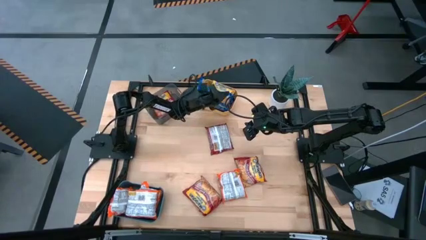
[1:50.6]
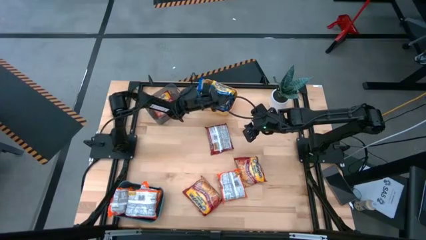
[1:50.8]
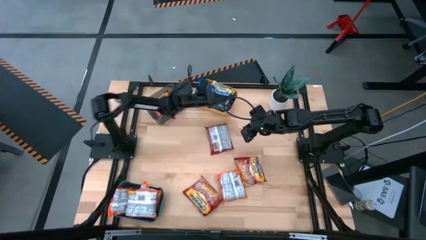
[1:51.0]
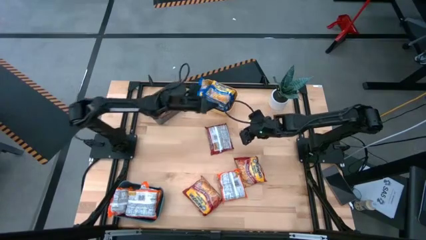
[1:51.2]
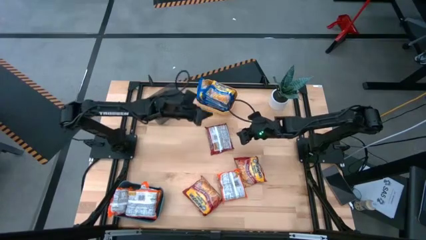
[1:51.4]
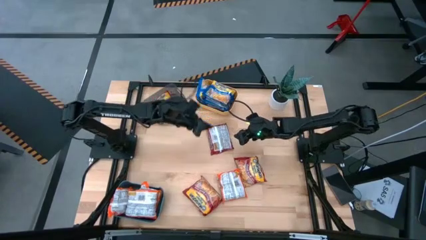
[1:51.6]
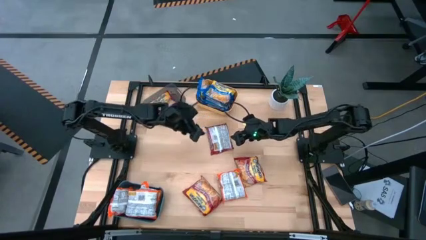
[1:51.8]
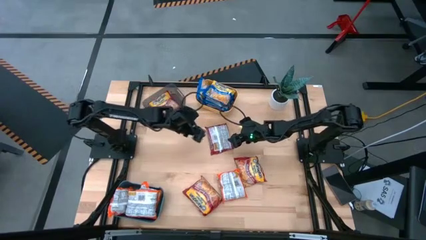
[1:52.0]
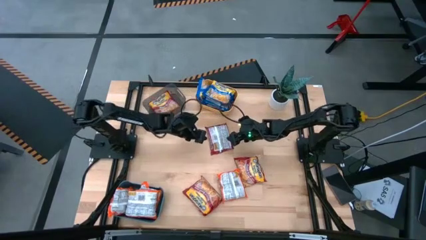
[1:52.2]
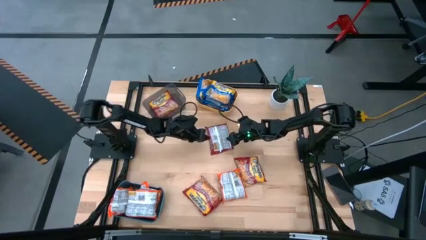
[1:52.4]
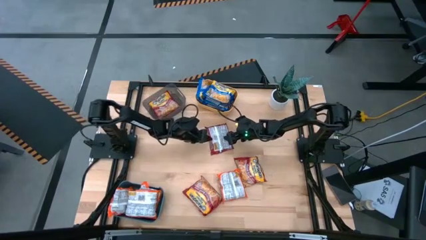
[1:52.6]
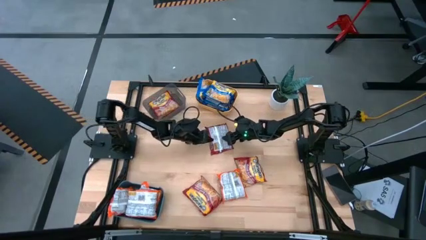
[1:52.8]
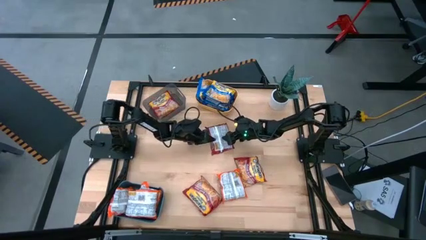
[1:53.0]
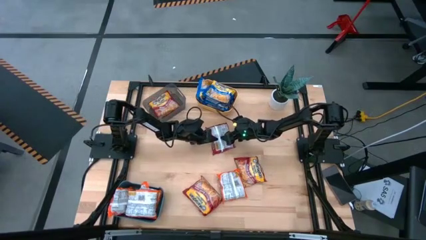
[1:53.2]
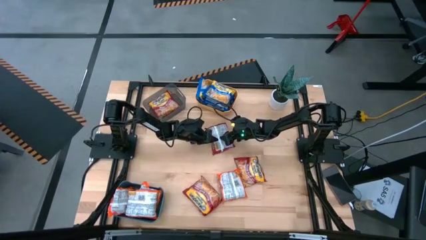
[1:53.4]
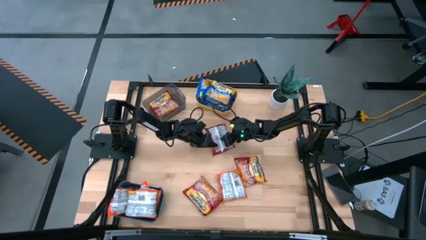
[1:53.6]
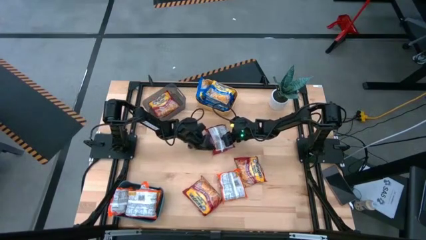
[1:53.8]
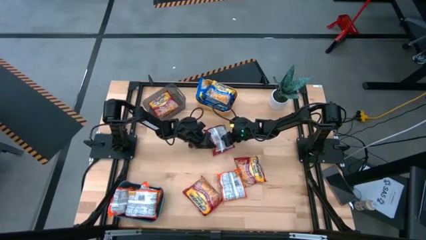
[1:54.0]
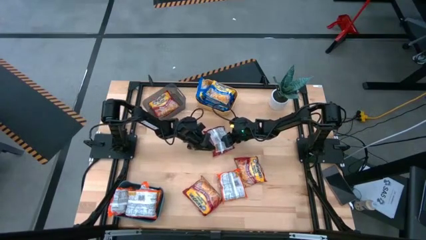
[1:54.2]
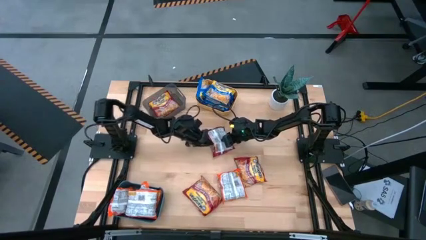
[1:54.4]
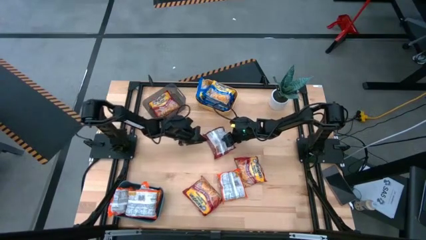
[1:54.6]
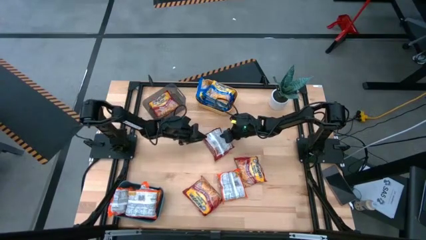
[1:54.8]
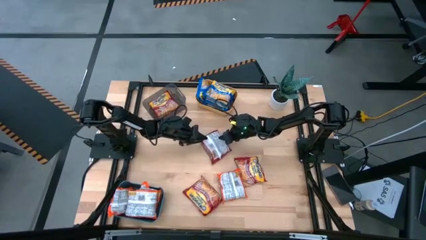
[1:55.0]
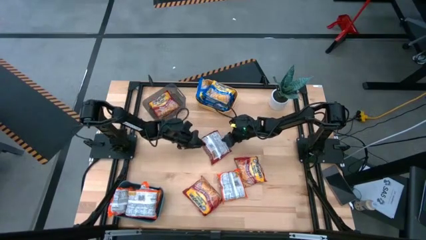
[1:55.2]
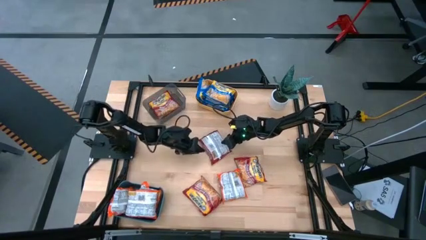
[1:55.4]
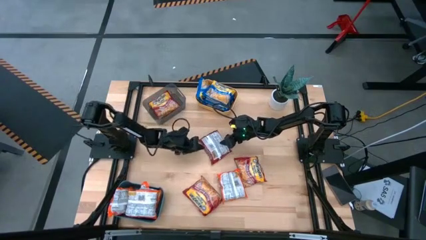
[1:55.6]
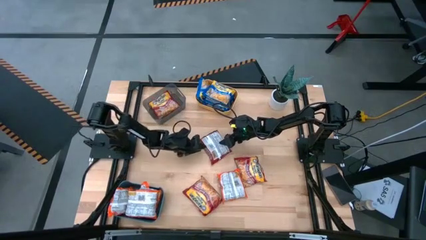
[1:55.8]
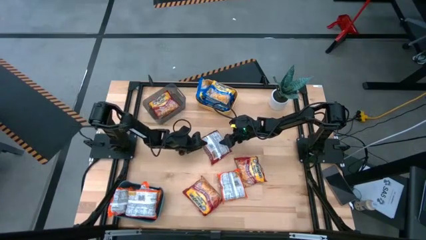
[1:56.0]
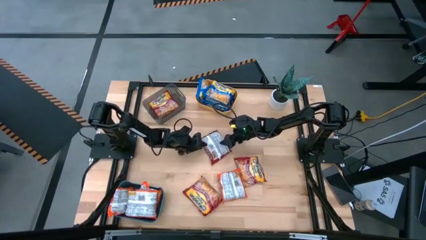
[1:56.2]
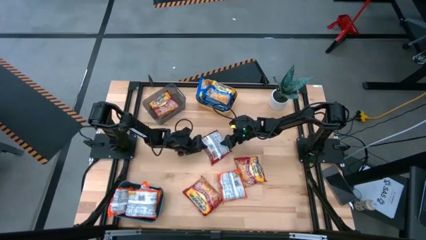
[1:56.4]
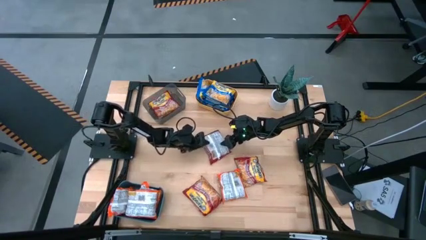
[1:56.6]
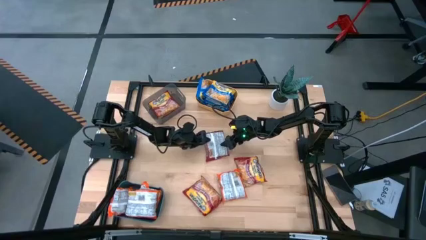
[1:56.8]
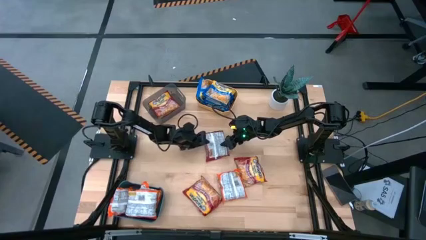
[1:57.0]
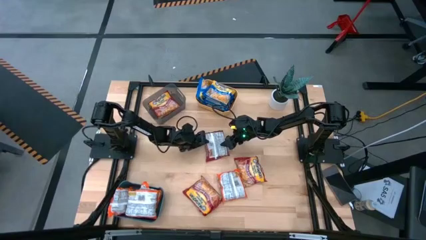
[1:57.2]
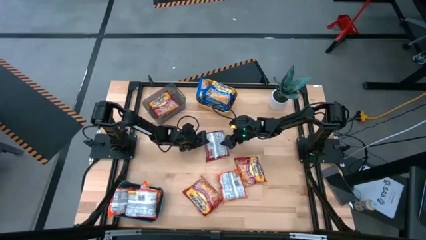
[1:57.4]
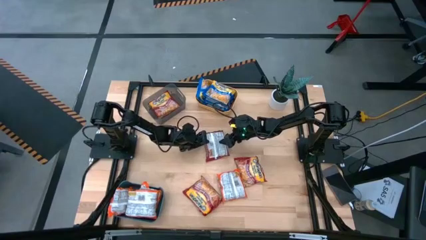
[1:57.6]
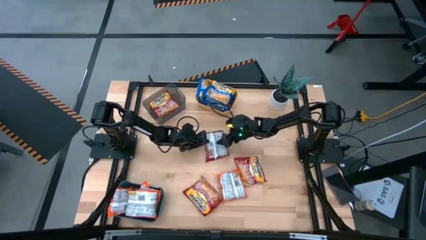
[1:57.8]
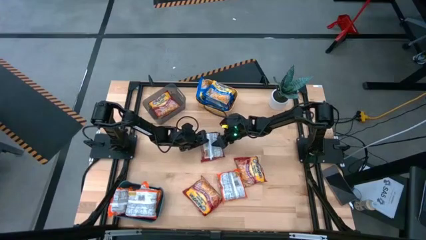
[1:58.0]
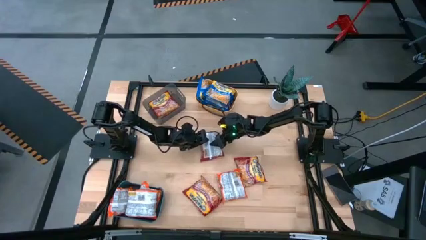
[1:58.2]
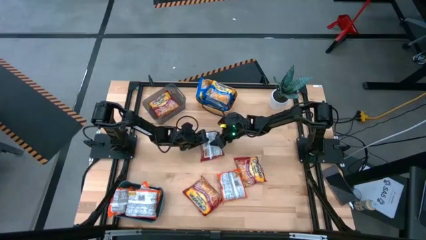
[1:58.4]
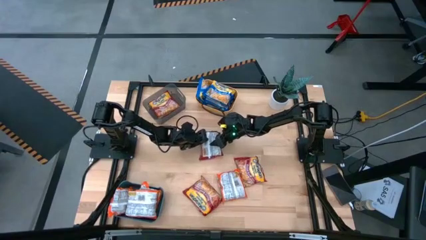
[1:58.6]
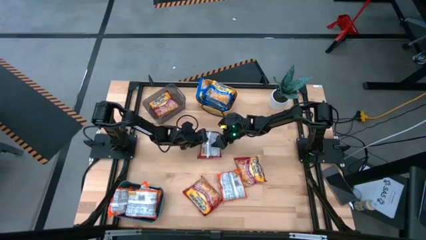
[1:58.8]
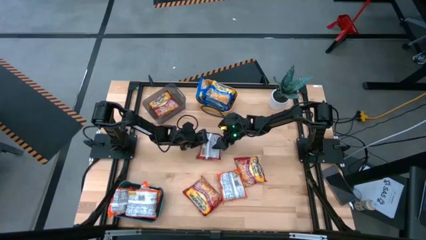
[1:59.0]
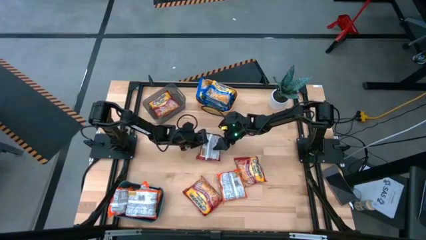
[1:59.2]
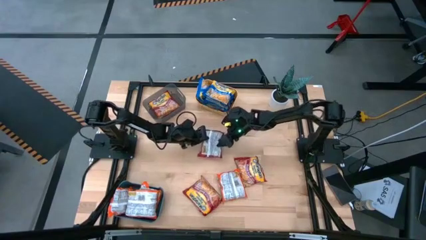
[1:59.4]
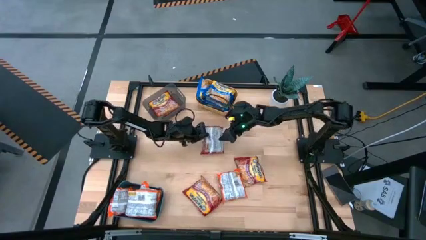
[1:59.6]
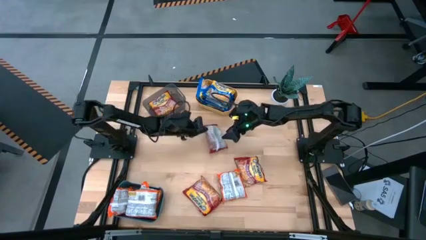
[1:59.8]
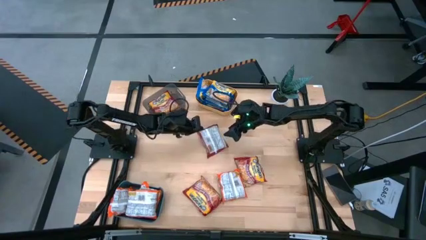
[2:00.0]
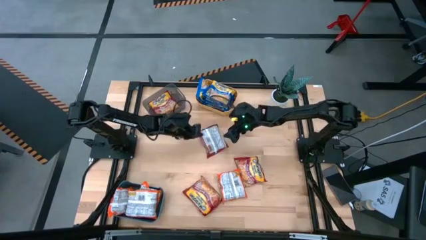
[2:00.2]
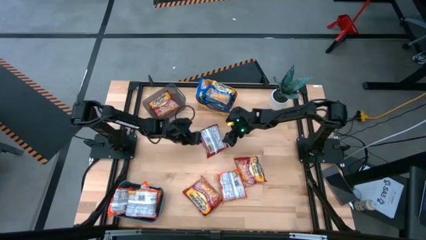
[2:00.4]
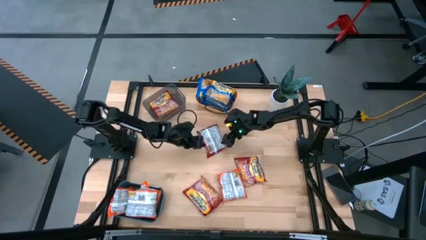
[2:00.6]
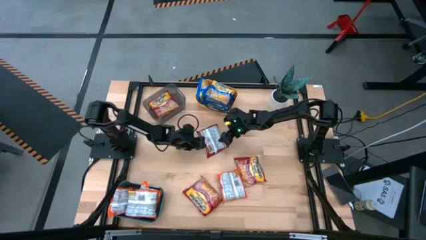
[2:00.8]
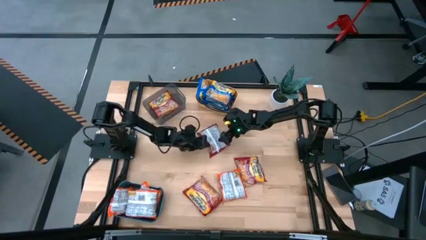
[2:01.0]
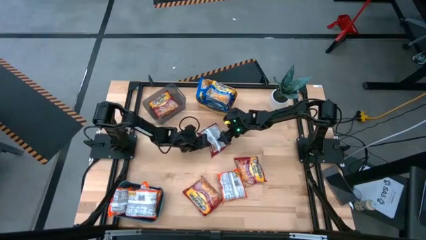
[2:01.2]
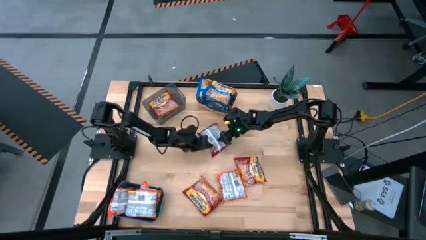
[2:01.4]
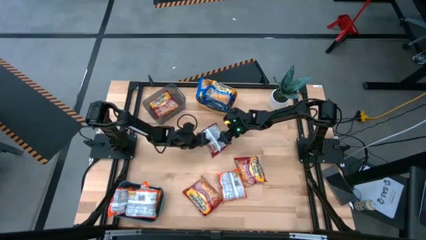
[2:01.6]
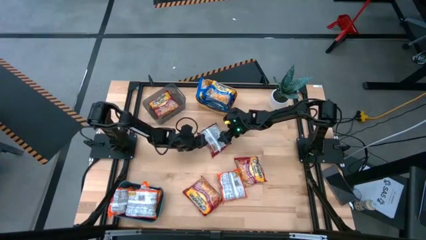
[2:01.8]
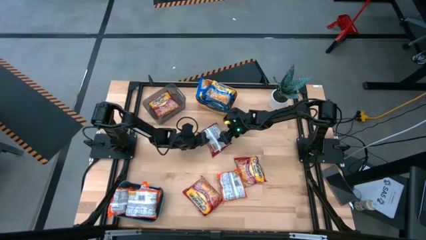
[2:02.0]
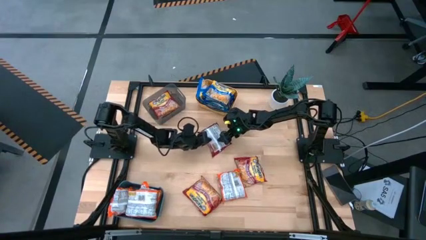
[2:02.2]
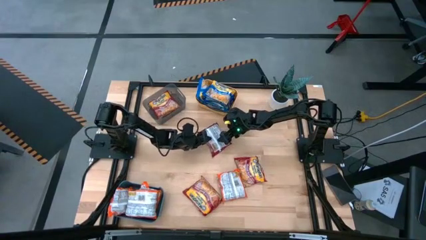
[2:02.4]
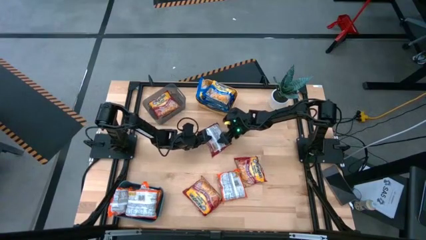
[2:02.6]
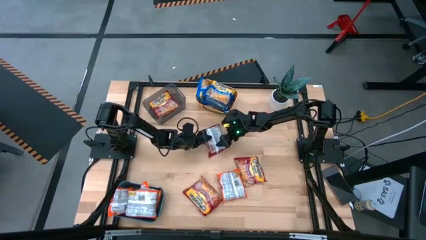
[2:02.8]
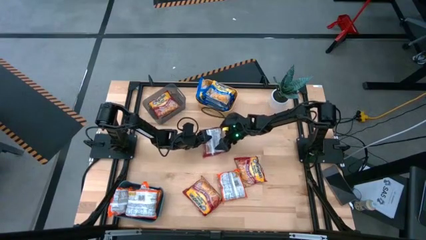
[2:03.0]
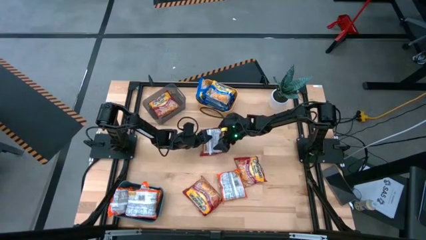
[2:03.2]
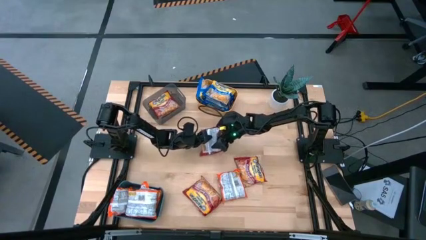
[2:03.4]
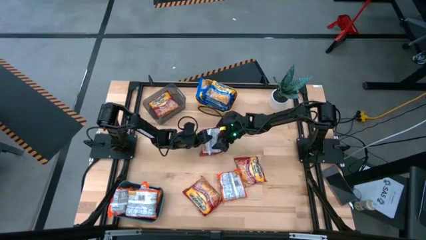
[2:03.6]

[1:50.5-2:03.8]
Task: Sort Maruchan noodles
Put the red noodle pack into the gray bin

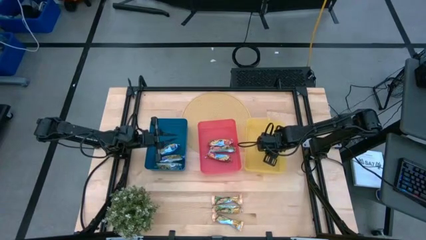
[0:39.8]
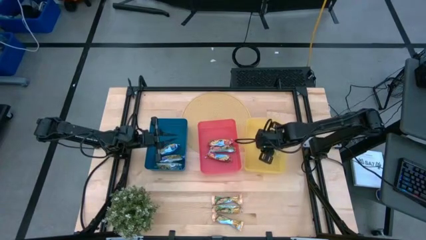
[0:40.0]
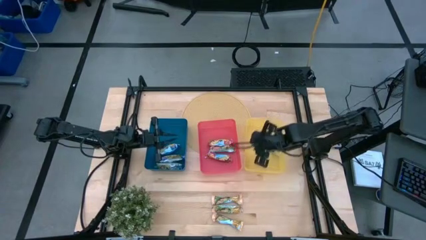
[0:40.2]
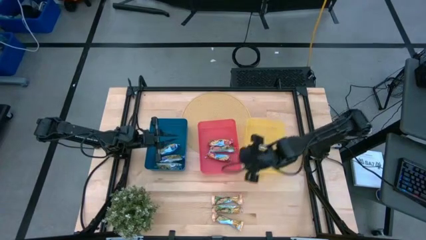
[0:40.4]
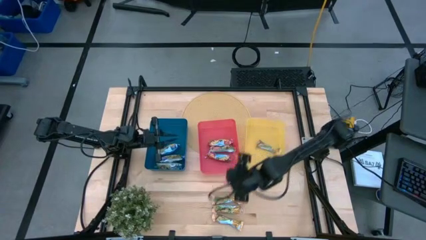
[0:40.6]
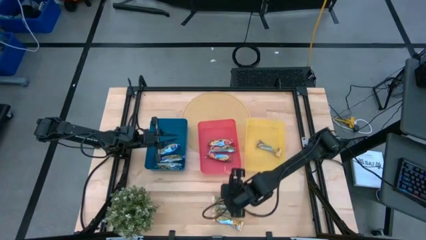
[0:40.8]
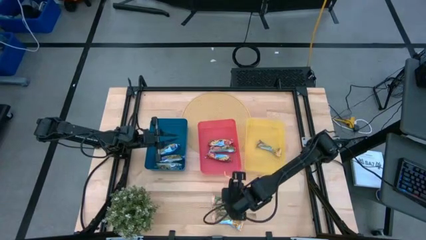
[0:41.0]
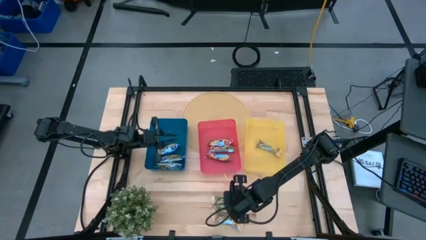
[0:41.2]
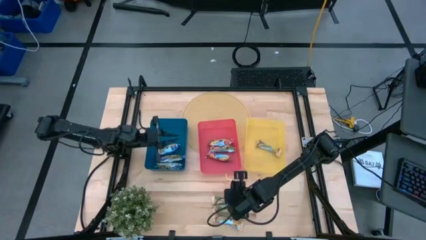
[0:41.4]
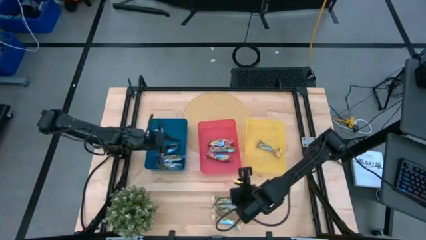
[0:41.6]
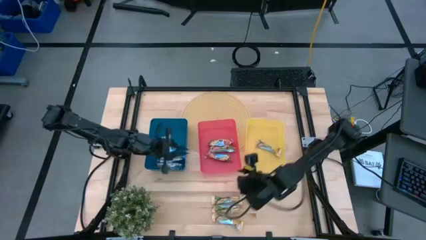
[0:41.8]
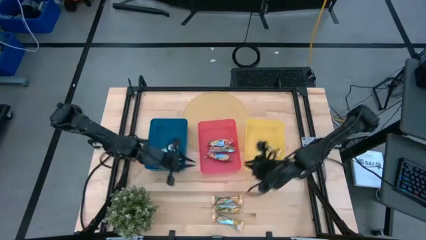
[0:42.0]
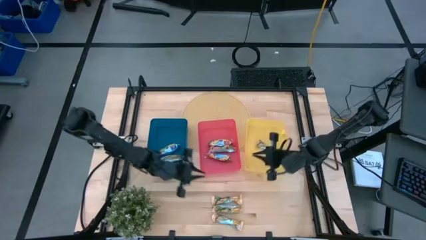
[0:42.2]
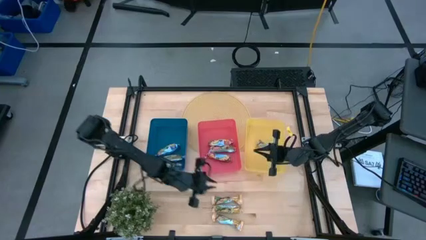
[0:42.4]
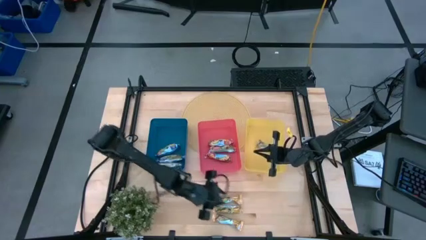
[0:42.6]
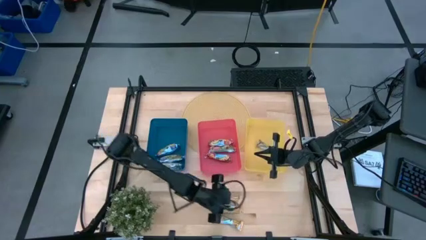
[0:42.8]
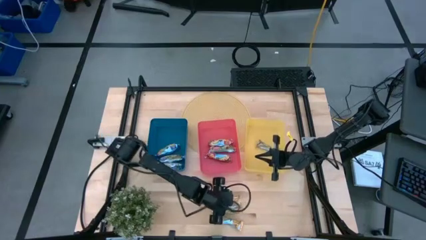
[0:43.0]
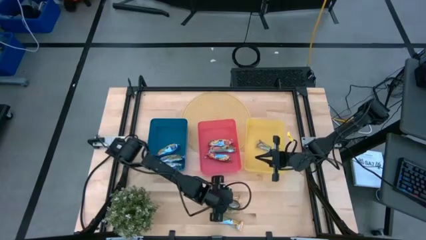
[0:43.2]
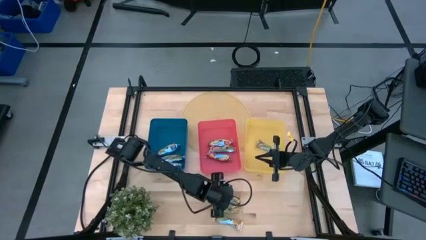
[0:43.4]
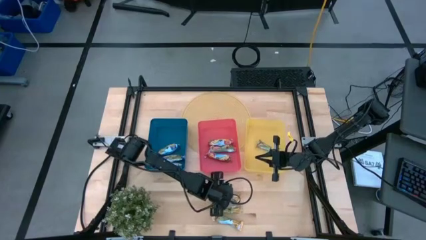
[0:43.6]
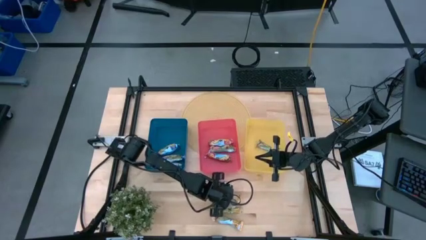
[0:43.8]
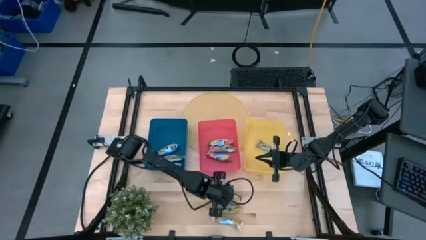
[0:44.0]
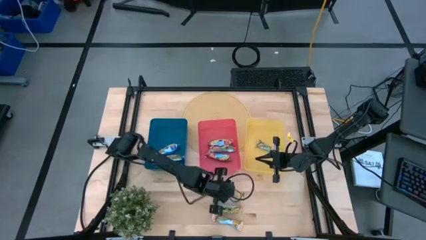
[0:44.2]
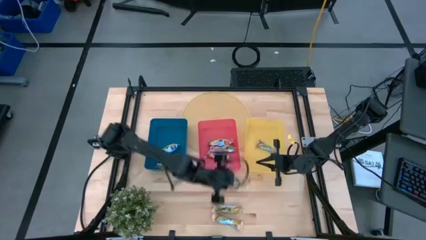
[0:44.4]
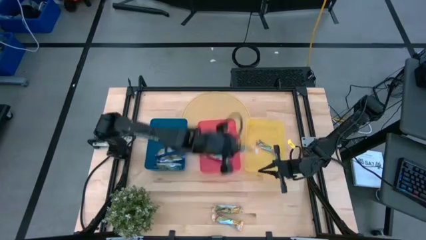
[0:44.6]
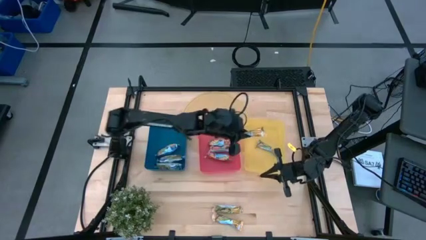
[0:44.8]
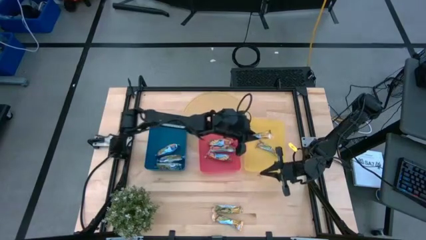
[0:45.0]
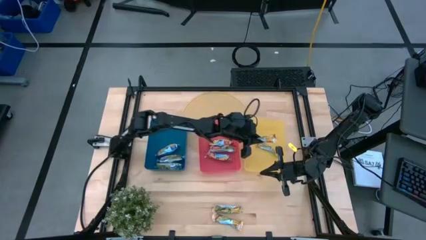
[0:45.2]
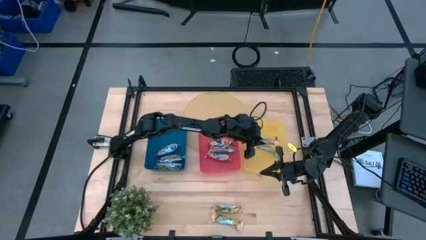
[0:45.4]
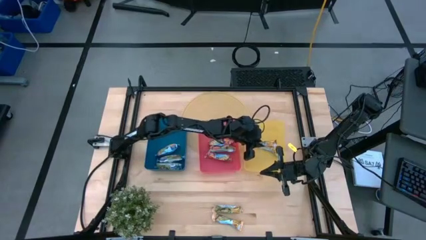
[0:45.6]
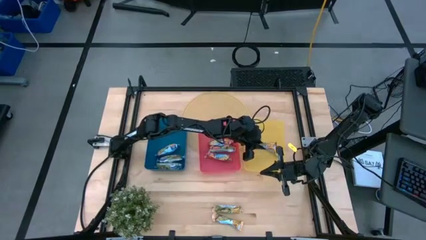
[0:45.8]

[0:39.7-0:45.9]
Task: Pick and place Granola Bars by type
Put the yellow granola bar into the yellow bin
